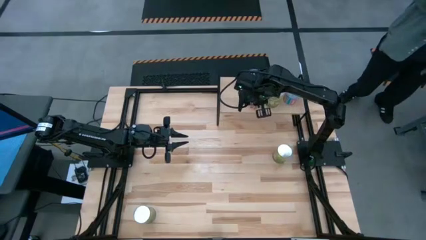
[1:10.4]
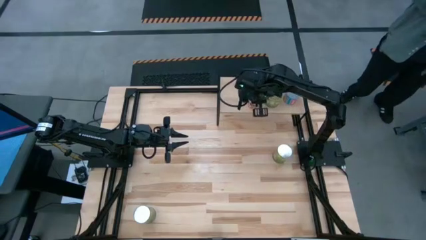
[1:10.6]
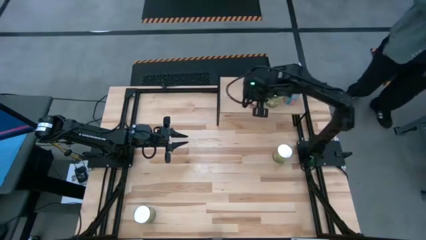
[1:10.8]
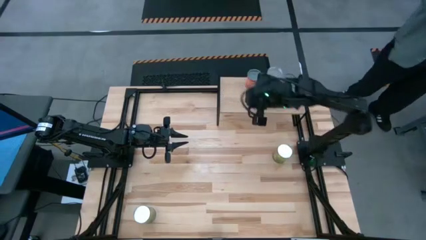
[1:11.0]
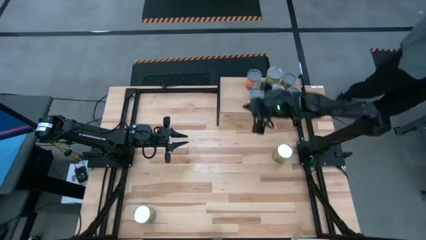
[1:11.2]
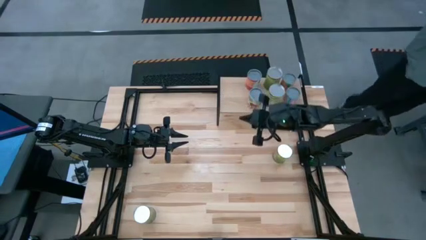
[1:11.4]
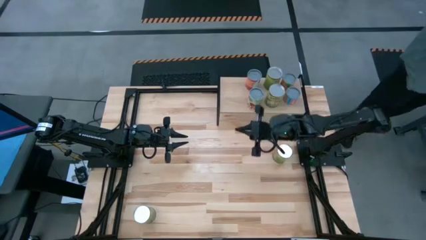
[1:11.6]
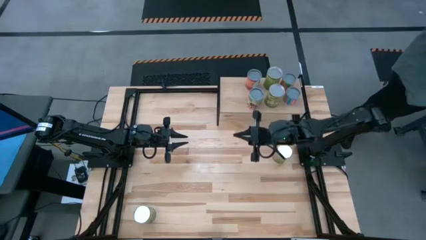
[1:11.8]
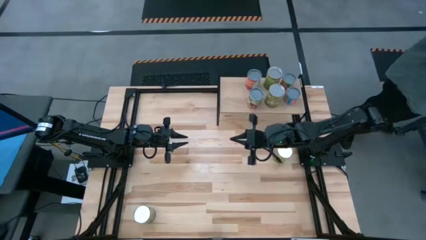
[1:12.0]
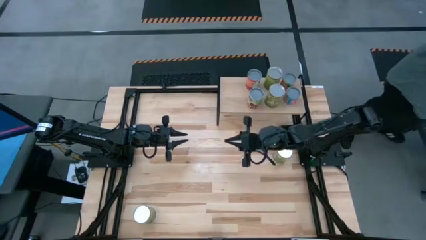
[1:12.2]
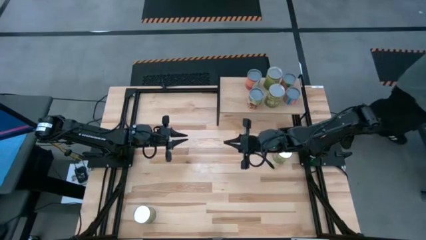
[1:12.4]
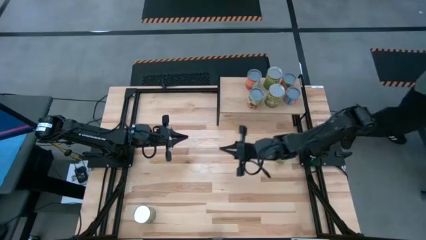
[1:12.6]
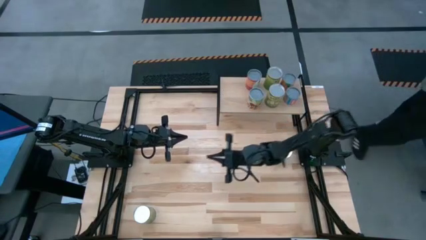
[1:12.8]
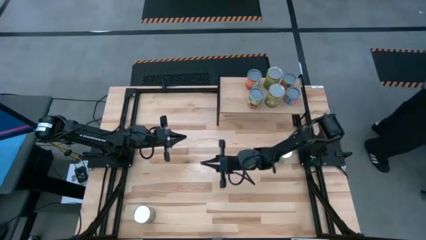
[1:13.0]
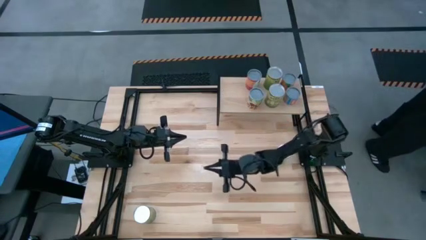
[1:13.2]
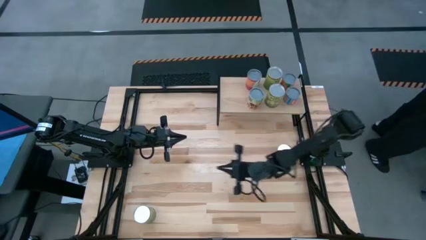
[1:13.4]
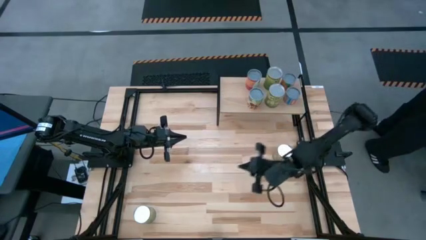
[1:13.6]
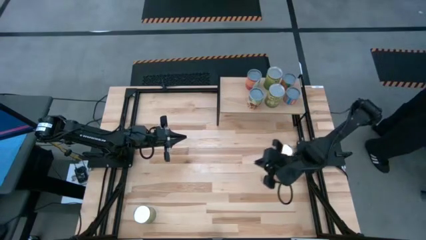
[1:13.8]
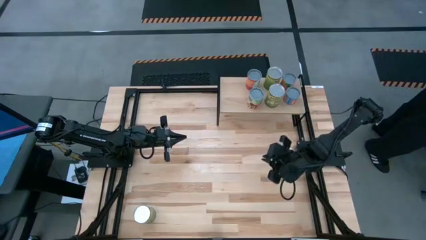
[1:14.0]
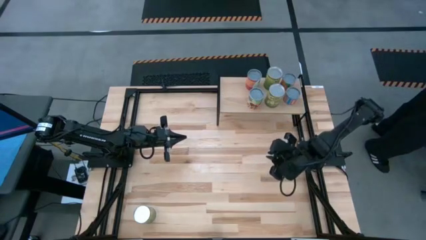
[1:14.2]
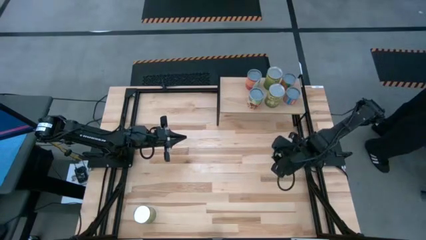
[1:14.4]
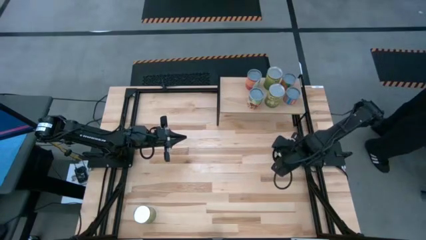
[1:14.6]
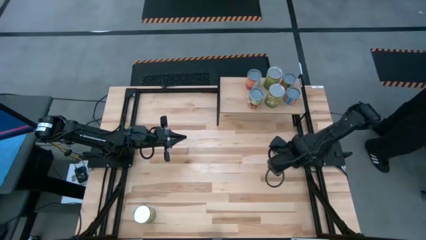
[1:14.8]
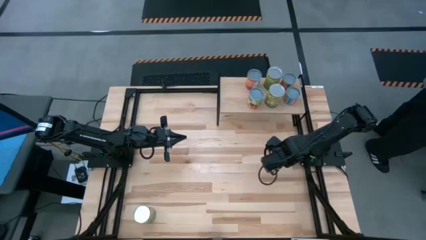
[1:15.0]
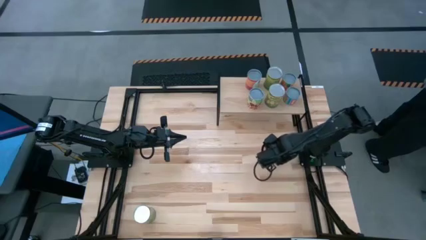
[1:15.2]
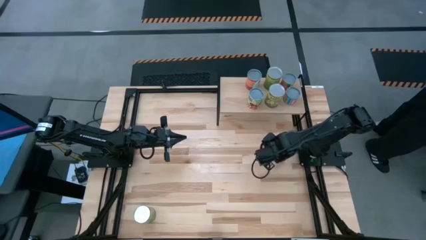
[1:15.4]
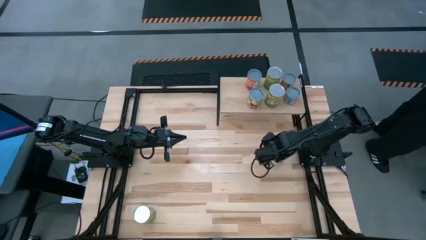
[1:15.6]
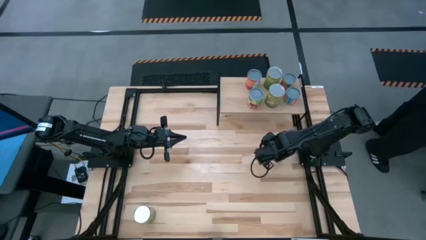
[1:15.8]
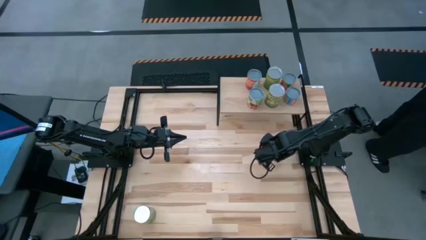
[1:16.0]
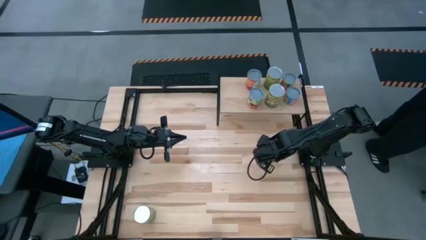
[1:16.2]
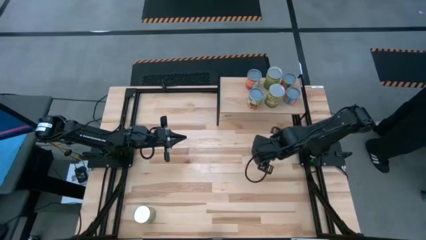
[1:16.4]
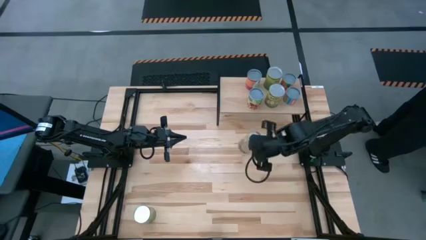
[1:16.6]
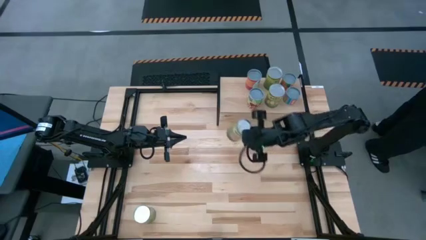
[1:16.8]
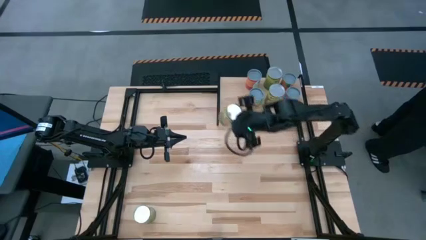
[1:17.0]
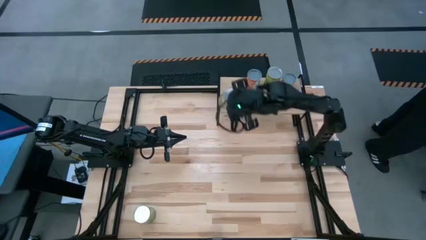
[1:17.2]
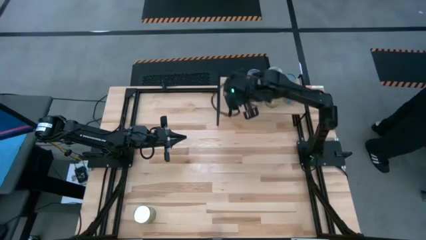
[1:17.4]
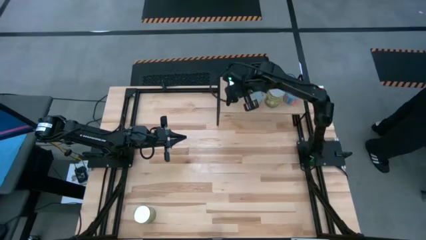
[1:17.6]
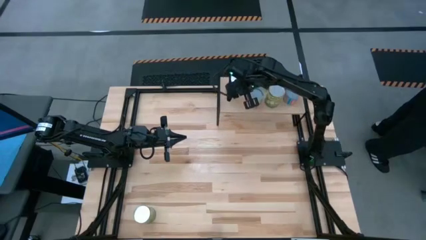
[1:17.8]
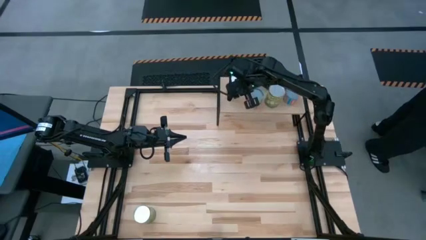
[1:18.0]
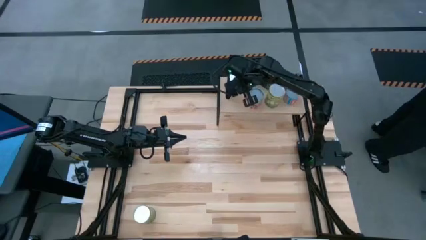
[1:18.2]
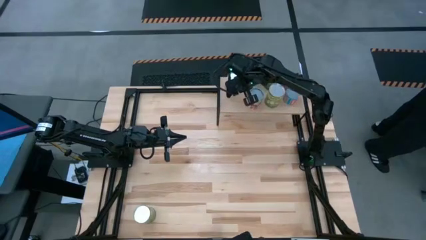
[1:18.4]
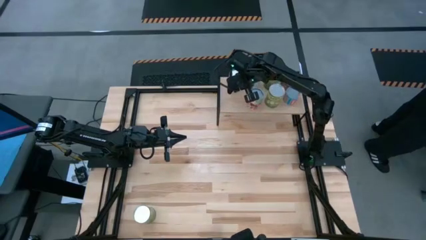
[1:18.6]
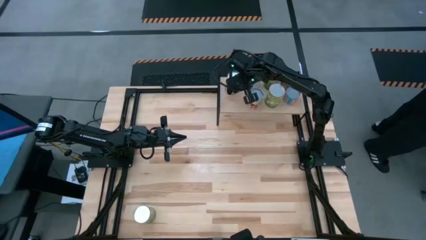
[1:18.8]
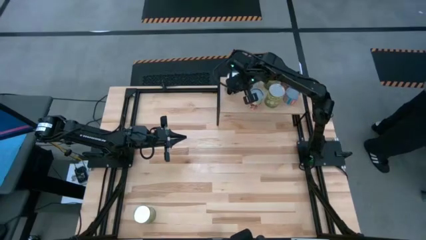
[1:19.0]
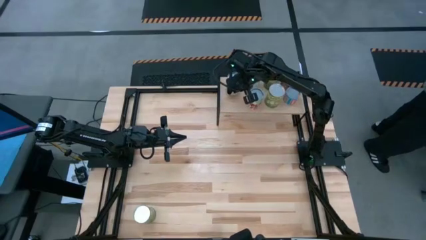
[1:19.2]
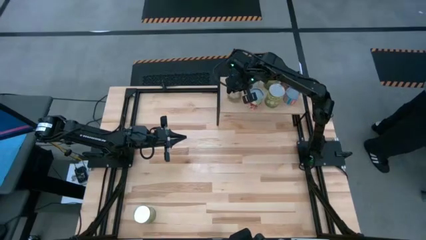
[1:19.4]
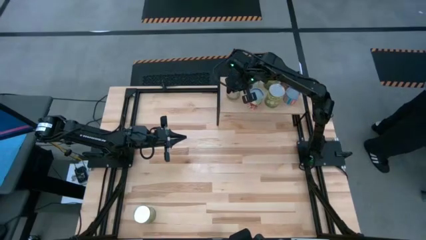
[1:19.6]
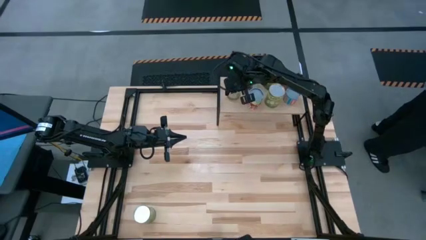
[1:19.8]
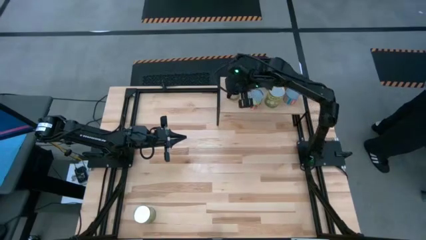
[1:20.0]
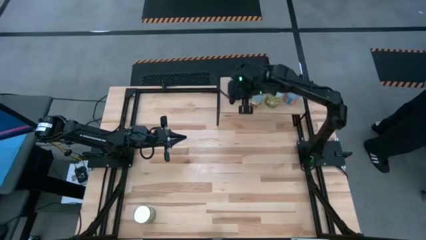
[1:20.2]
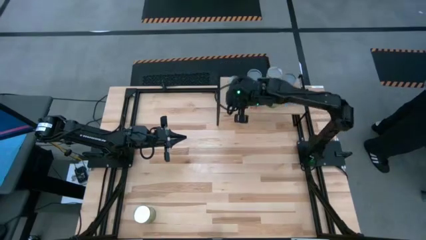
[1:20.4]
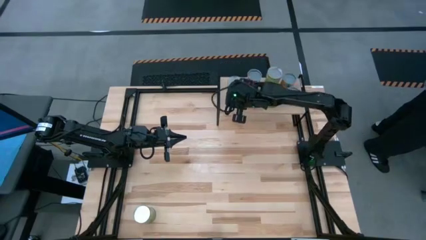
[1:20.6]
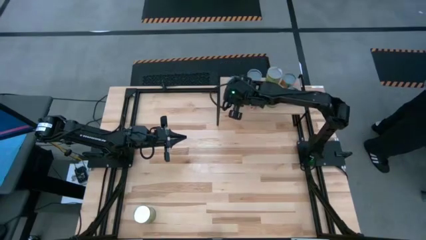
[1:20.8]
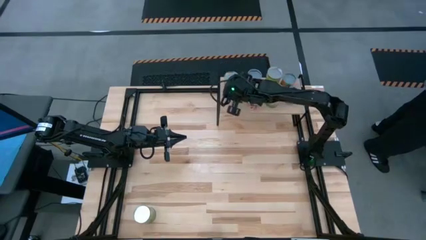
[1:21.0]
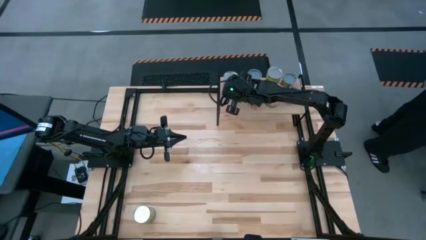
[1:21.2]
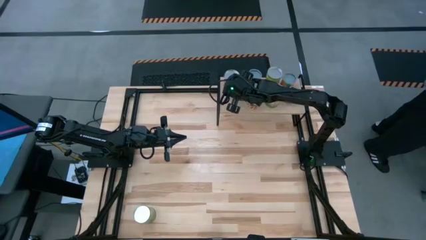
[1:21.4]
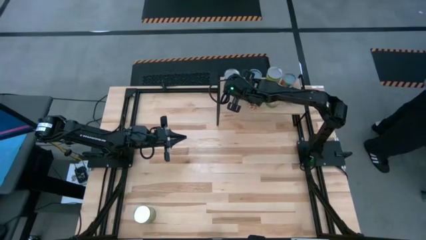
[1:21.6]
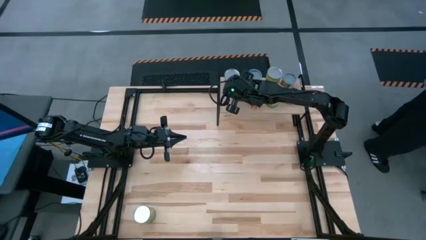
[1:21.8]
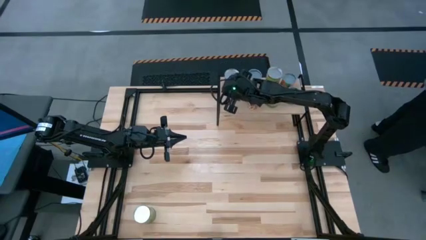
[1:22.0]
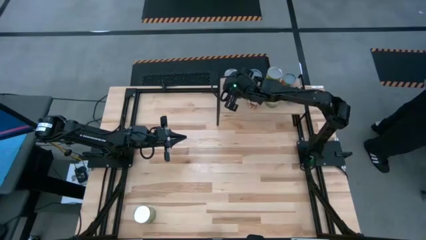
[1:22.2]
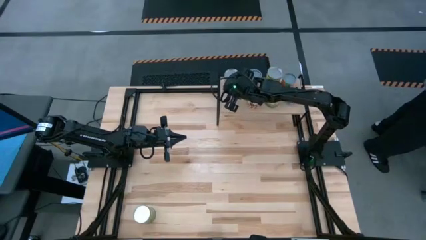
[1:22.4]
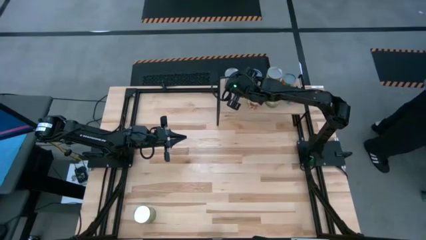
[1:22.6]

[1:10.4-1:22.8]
Task: Pick and place cans onto a shelf
Put the top large canned oranges on the shelf

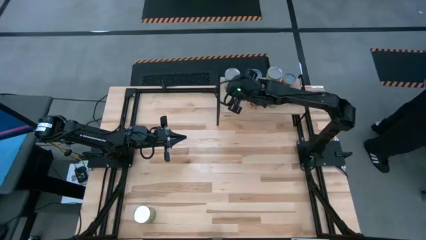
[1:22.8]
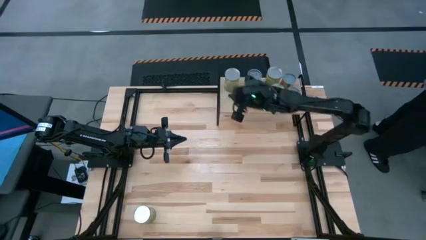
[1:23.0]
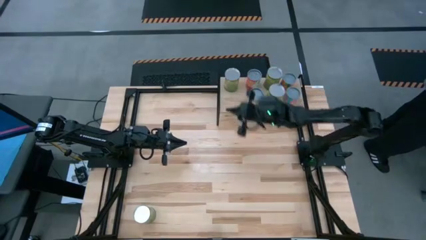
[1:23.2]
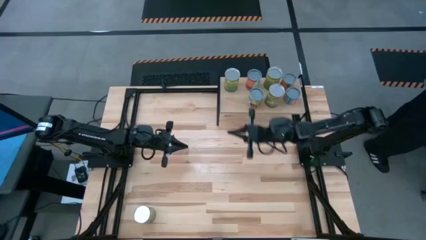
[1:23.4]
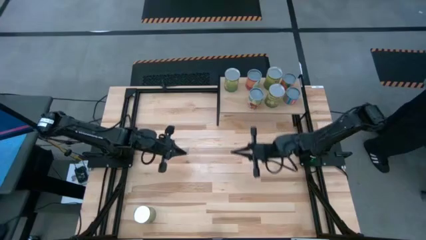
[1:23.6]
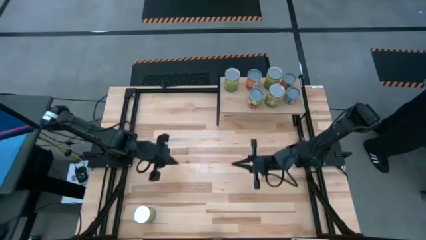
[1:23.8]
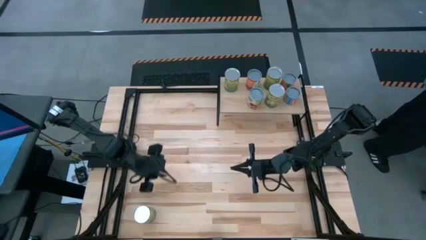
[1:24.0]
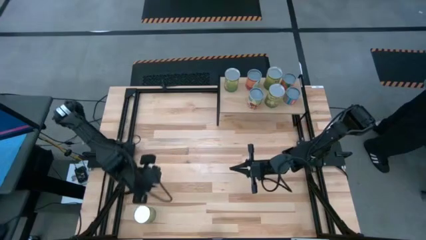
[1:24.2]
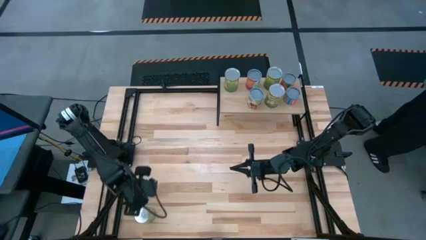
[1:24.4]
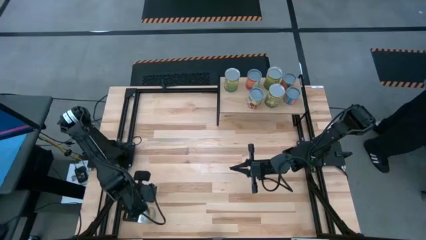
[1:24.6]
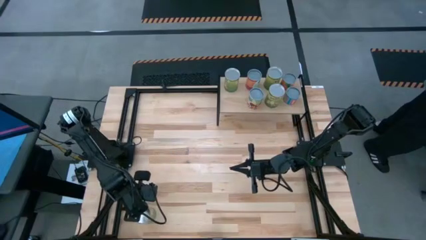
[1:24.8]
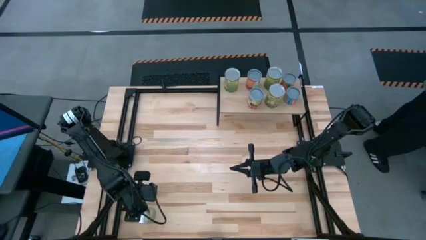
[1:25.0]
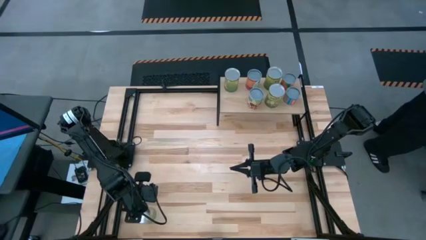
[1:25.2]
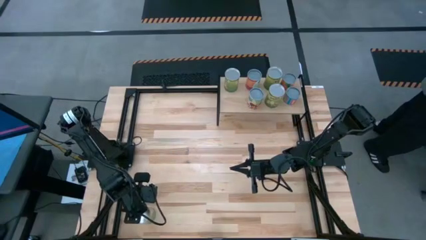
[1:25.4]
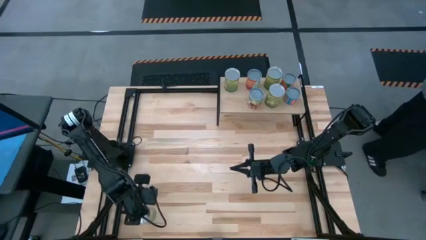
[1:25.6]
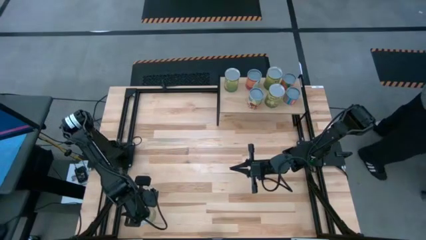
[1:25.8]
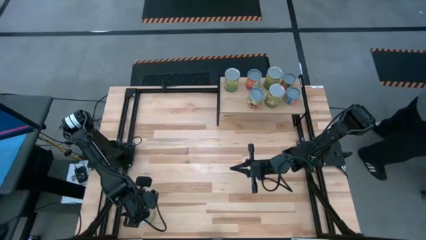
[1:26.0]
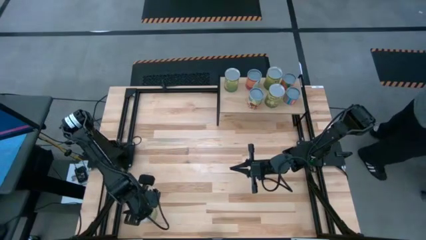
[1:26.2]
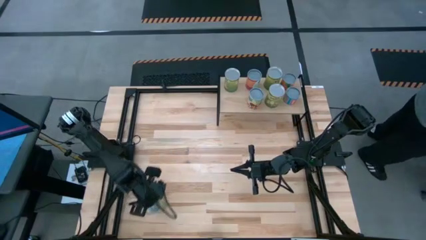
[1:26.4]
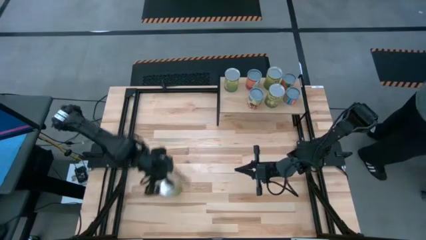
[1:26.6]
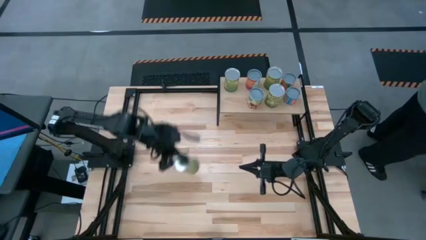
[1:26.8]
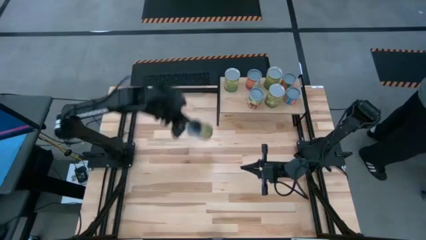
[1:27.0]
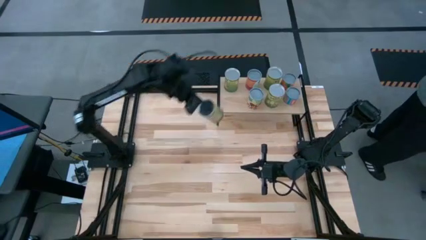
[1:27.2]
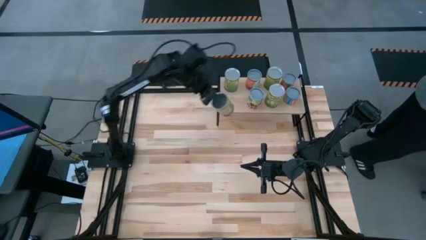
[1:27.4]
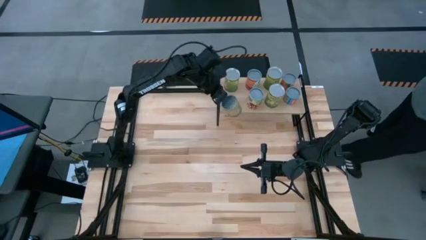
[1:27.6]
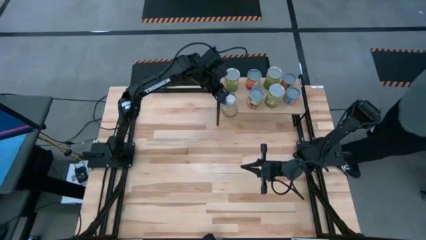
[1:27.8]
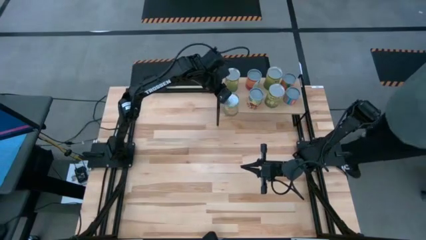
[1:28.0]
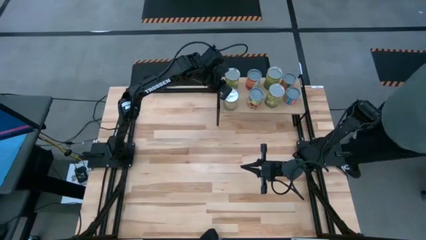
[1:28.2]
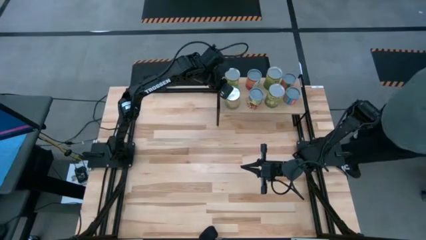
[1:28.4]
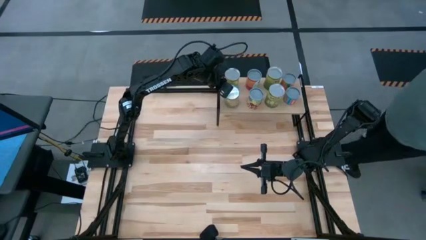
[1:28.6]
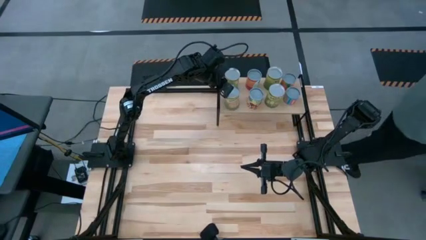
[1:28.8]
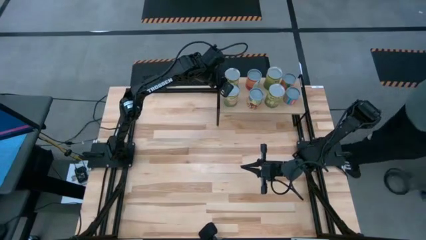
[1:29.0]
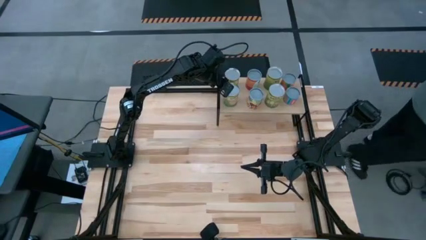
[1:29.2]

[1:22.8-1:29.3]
Put the large canned oranges on the shelf and aligned with the large canned oranges
